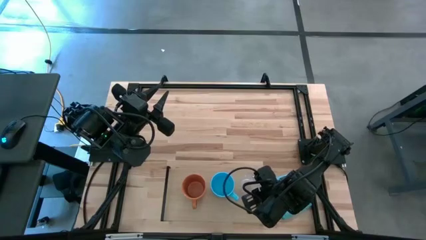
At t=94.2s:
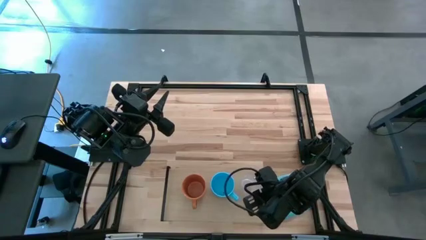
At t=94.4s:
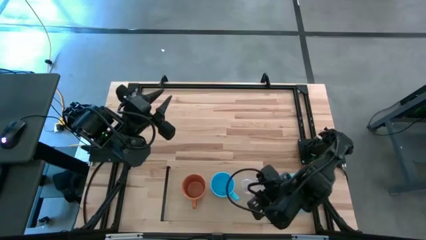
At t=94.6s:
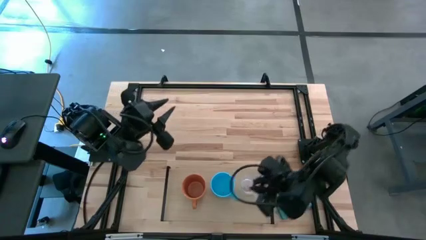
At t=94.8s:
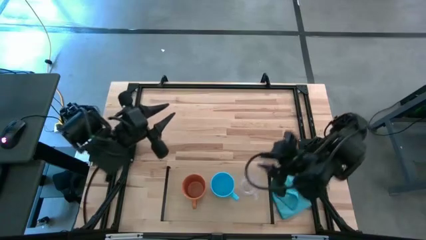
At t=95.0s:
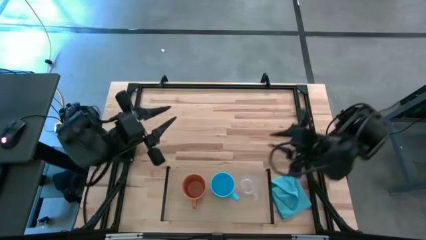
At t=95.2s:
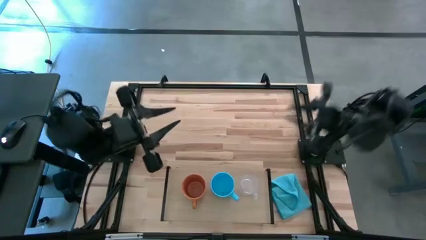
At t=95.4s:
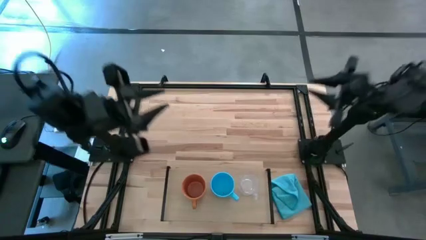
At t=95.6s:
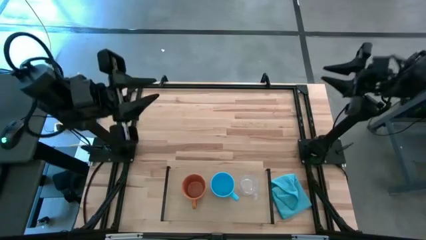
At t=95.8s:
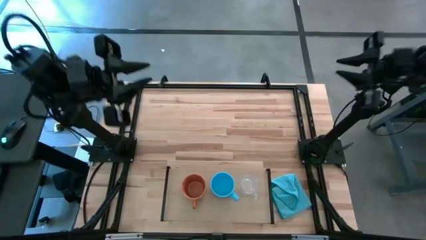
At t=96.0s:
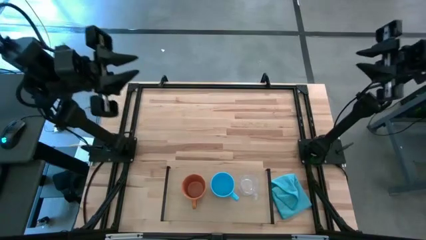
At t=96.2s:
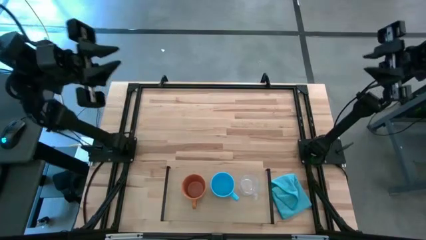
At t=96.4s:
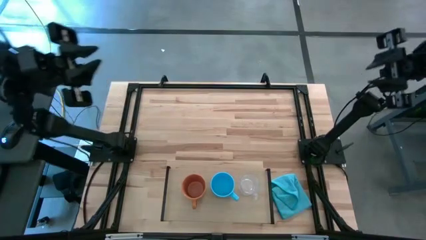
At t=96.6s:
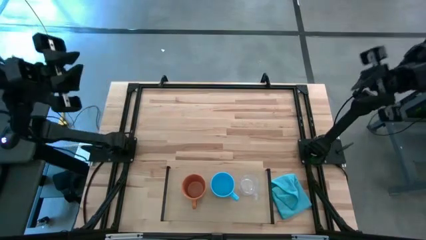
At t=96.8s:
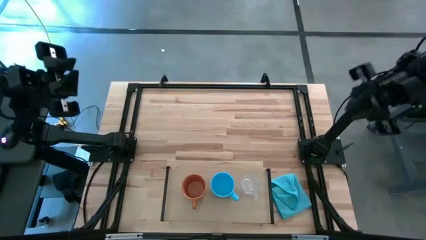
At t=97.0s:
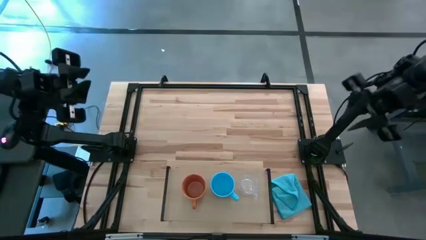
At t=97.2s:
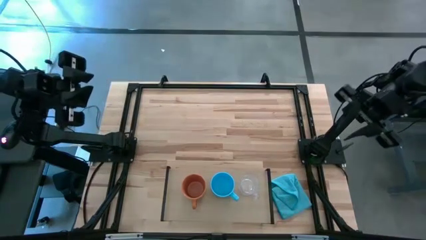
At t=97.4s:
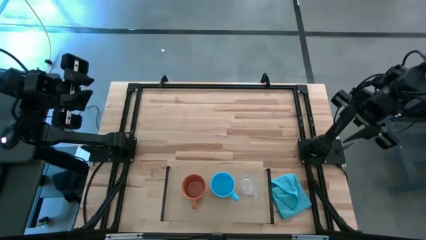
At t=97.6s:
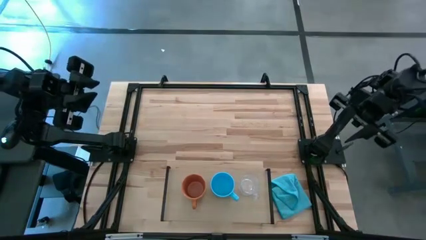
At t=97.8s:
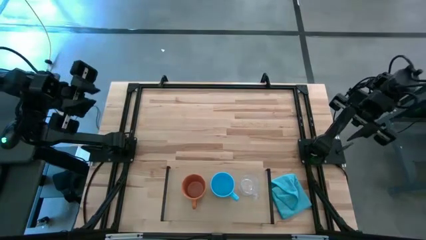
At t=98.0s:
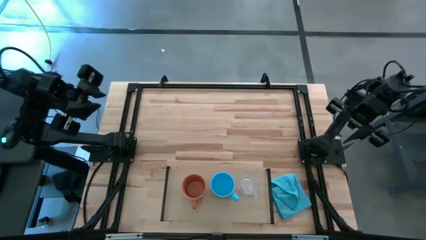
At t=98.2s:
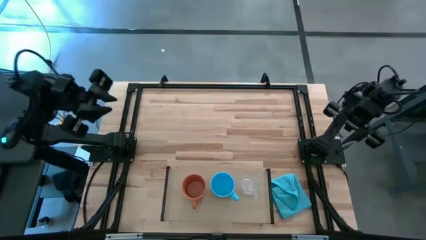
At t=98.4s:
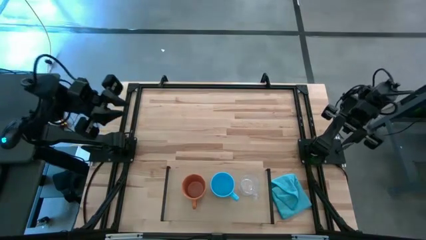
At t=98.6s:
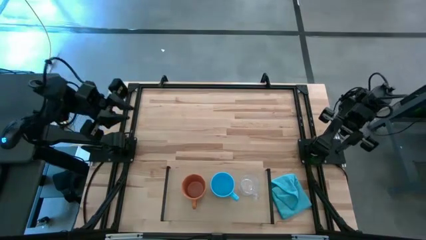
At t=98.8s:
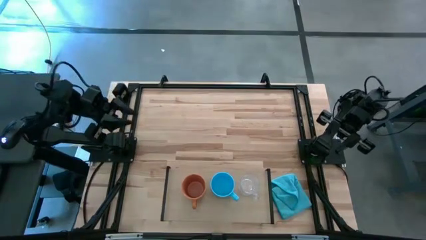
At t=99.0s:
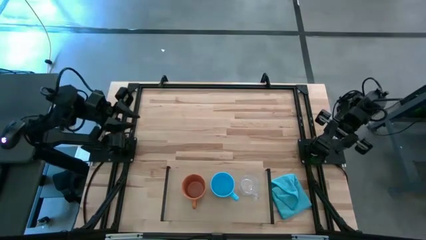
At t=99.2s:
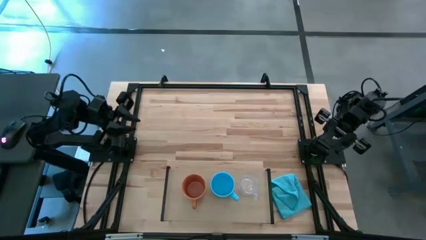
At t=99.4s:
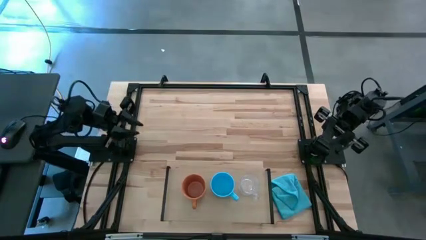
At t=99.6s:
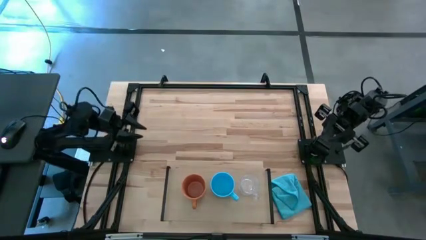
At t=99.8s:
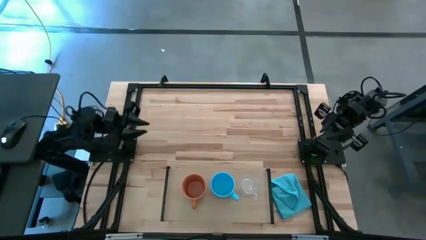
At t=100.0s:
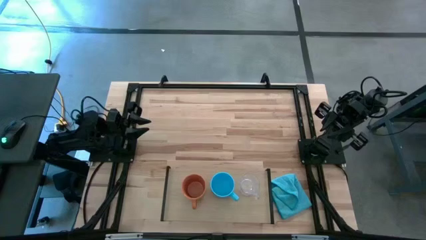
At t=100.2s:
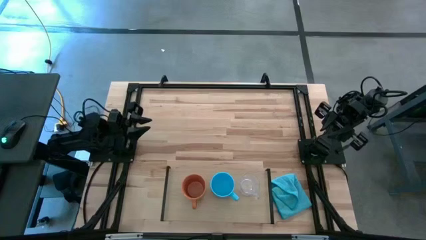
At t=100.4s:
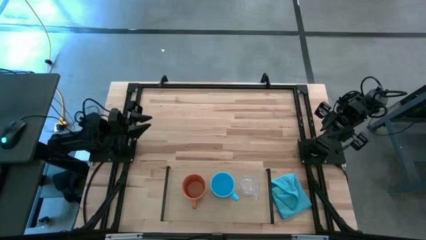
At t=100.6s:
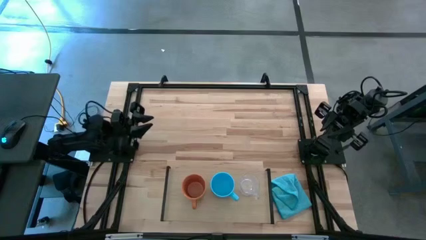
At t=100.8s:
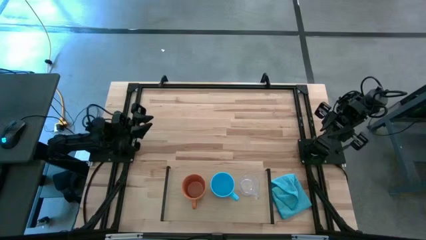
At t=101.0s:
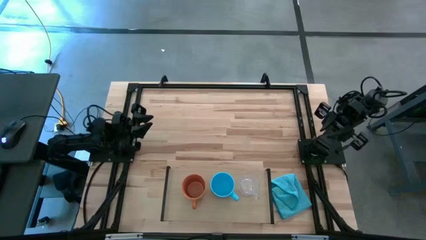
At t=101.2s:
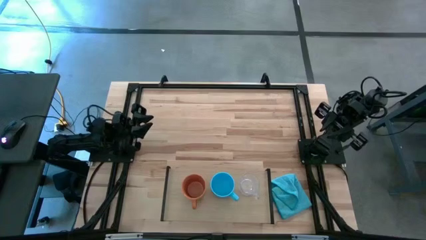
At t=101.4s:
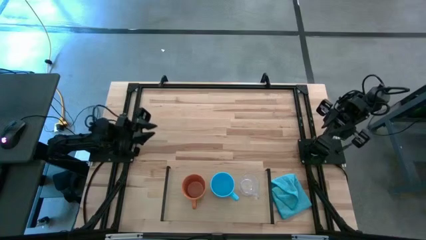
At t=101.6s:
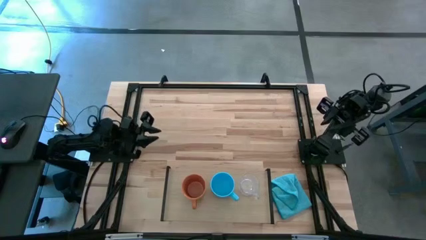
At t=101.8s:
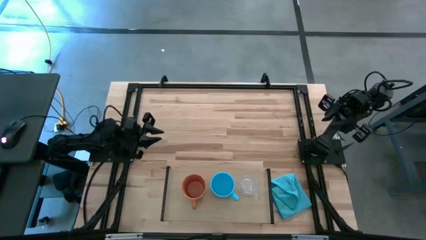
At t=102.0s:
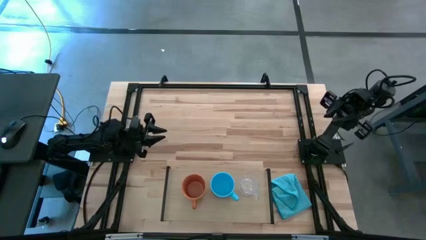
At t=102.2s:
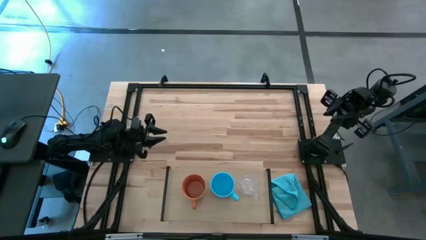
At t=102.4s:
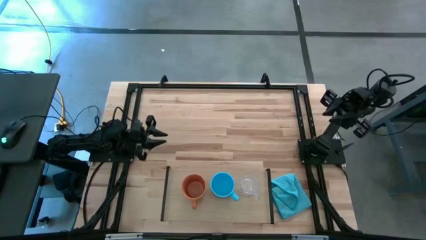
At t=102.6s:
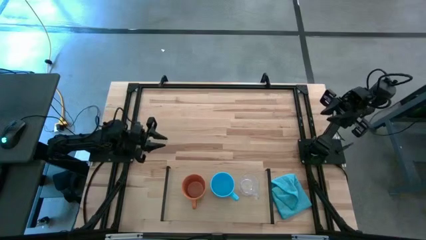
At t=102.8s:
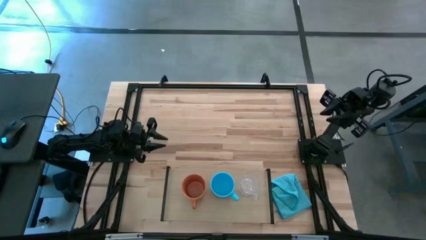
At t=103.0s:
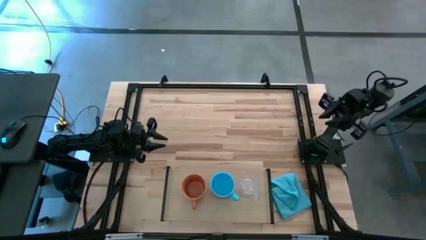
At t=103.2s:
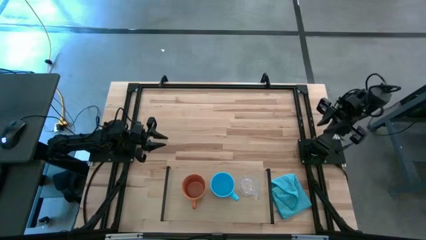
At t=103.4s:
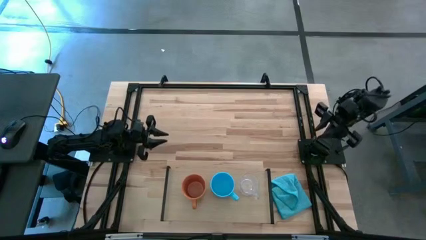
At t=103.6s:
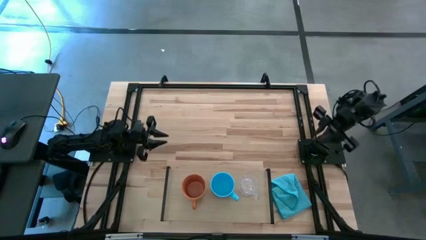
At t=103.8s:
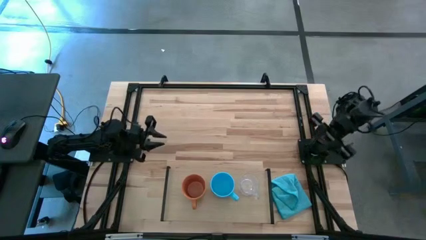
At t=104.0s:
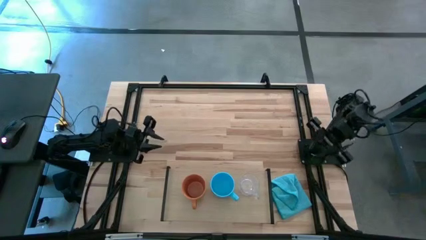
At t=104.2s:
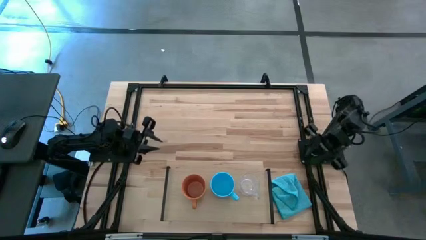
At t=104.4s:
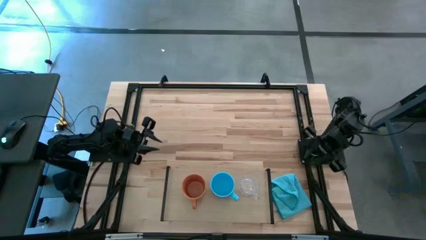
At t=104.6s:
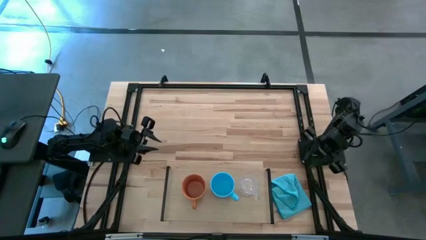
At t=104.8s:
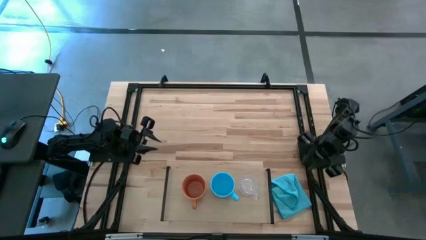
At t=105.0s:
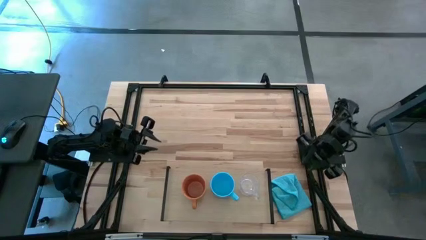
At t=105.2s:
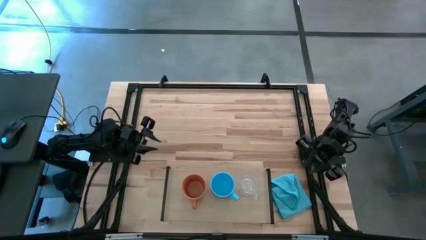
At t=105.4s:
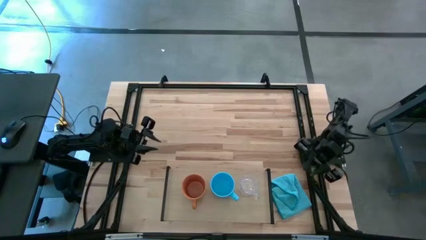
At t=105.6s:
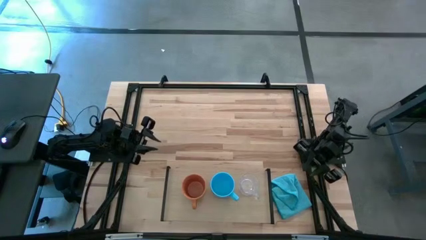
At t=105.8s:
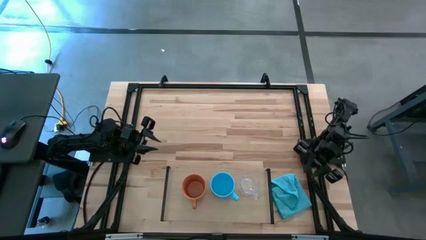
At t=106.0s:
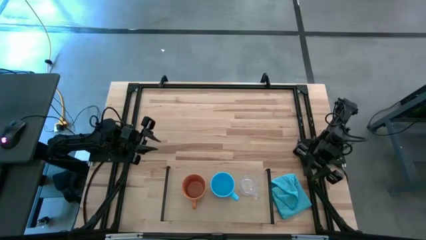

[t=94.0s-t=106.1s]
Task: Stack small to large cups/mugs on shelf
Return to Home Position

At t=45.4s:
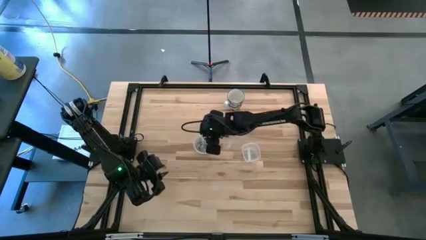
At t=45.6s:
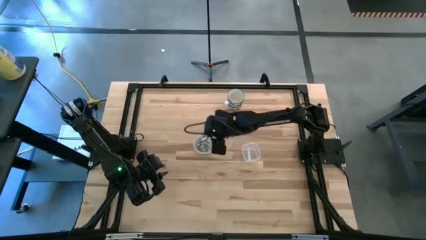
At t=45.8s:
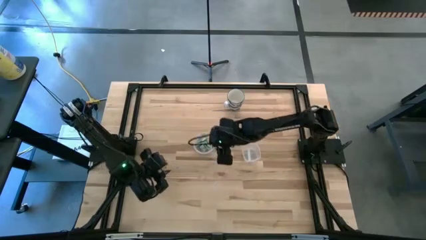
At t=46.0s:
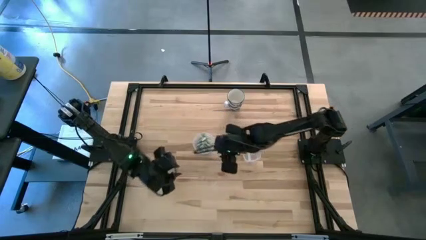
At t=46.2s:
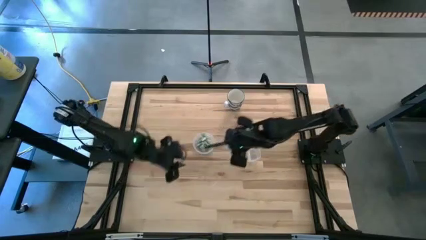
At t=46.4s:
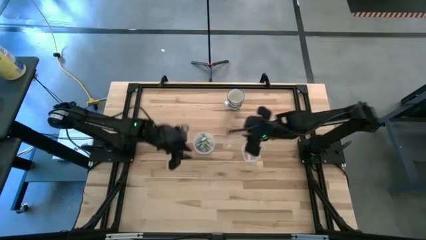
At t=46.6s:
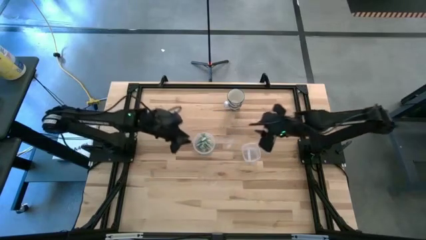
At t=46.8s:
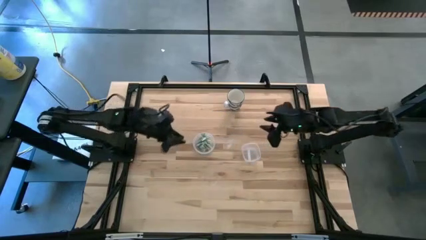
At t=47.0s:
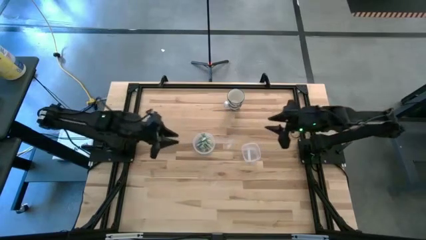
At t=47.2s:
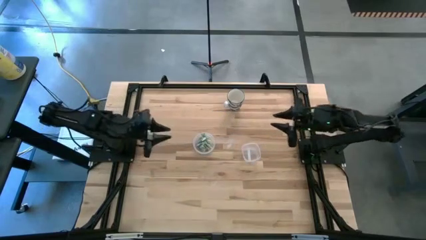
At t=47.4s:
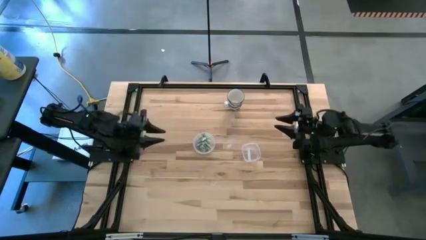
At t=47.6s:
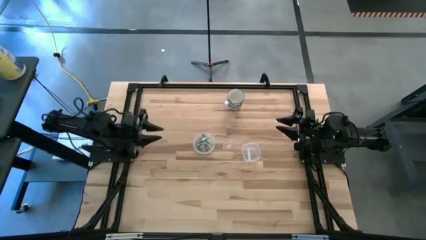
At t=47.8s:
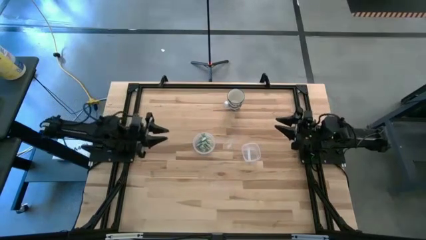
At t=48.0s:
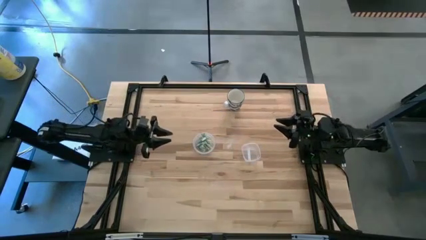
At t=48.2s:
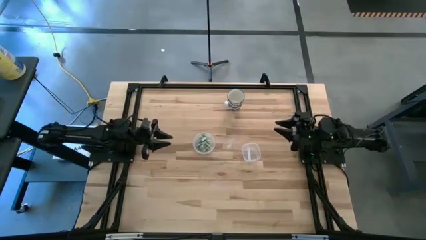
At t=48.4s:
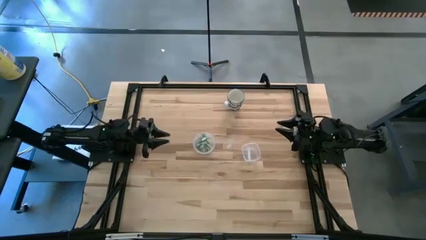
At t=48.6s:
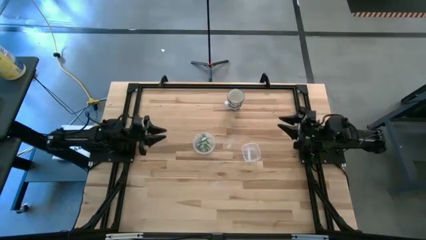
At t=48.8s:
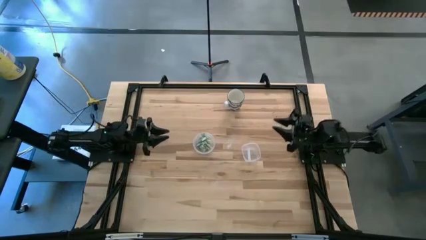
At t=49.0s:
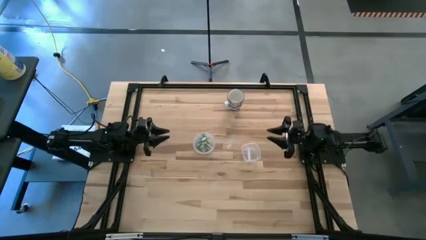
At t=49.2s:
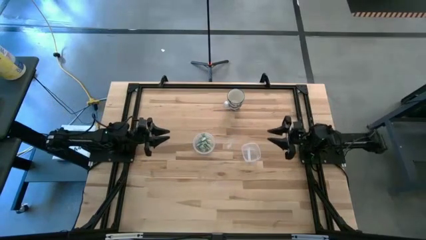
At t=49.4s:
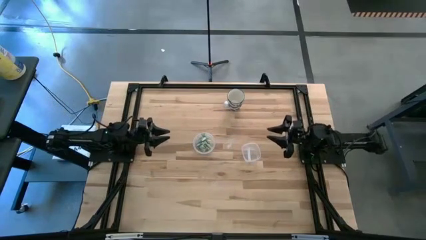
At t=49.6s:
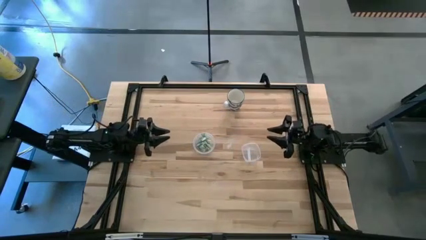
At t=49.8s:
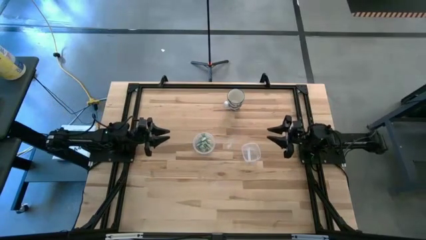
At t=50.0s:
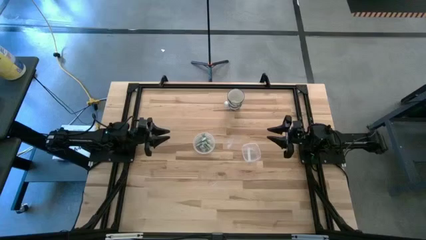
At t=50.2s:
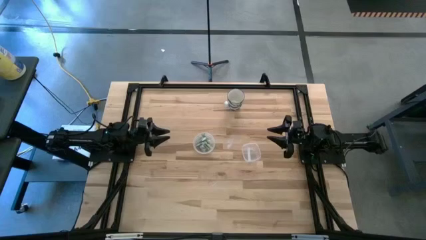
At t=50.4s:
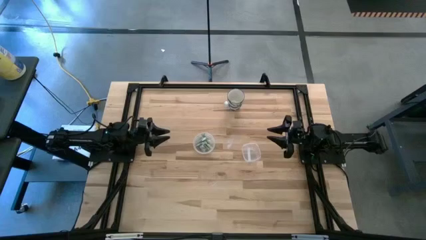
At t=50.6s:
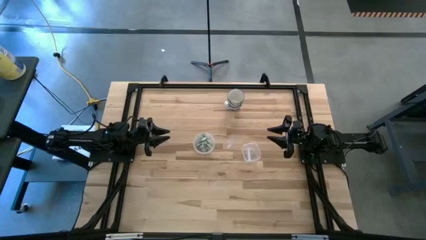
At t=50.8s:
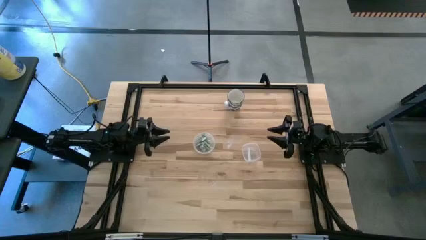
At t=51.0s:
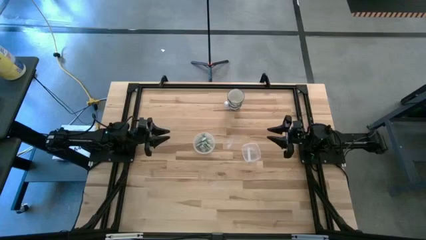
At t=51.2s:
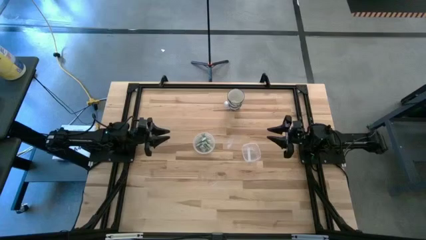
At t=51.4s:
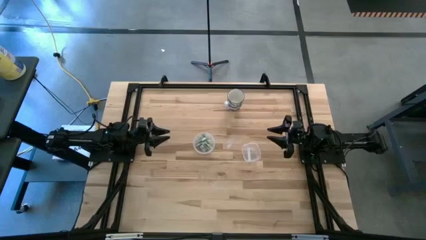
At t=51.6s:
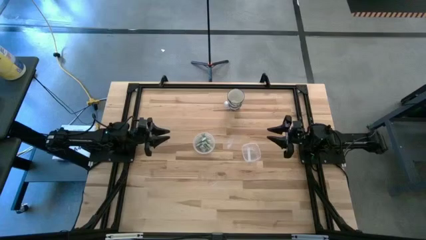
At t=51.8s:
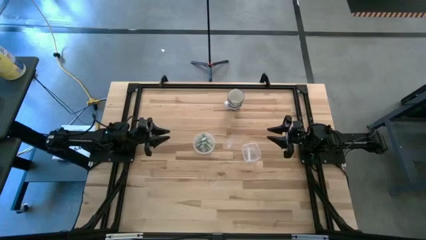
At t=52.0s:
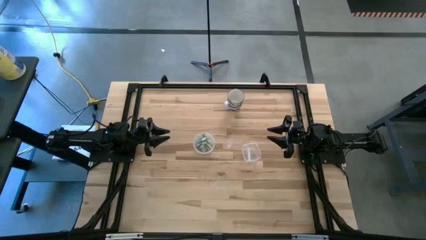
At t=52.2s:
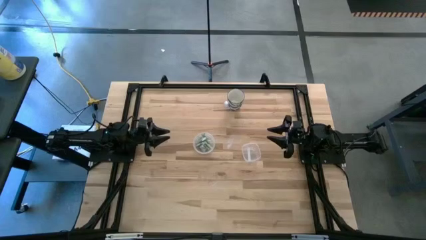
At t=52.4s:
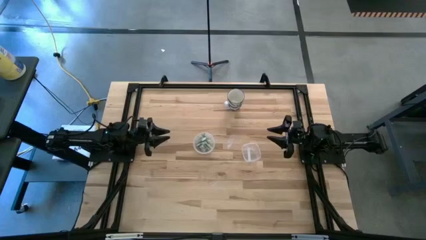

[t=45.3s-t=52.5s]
Task: Pick and place Stevia / Truvia into bins
Return to Home Position
